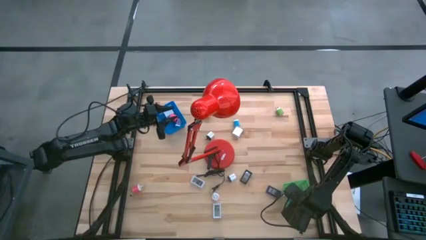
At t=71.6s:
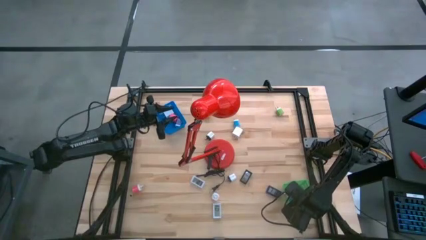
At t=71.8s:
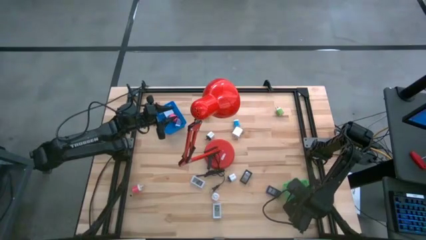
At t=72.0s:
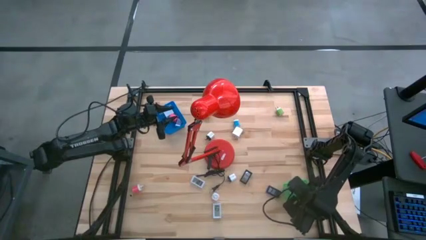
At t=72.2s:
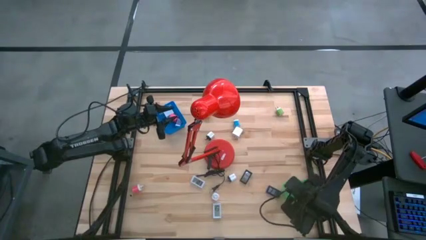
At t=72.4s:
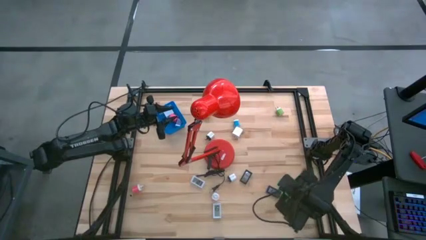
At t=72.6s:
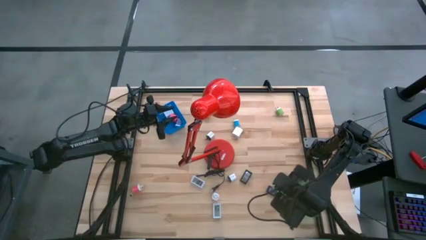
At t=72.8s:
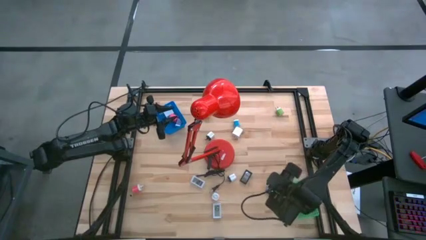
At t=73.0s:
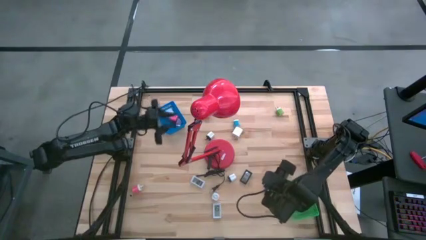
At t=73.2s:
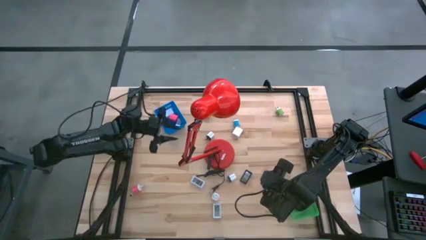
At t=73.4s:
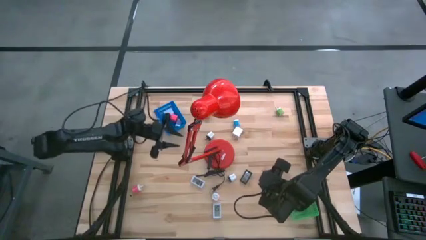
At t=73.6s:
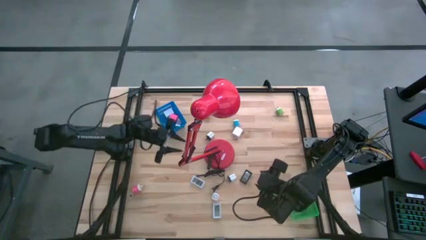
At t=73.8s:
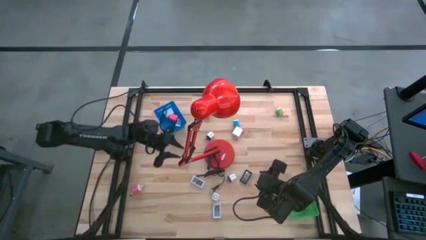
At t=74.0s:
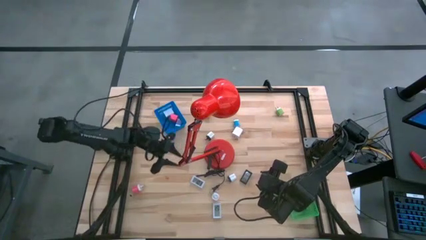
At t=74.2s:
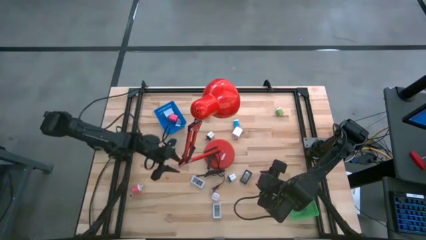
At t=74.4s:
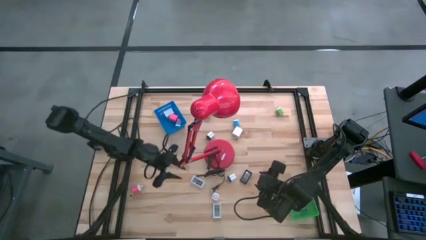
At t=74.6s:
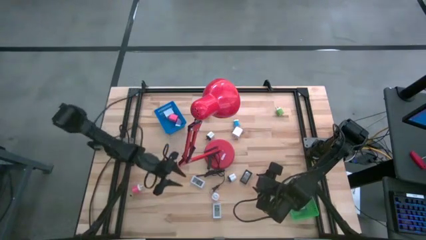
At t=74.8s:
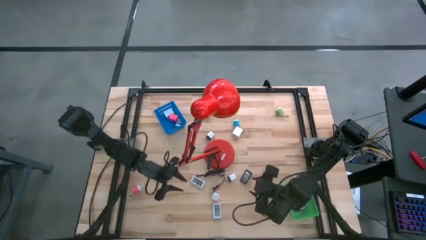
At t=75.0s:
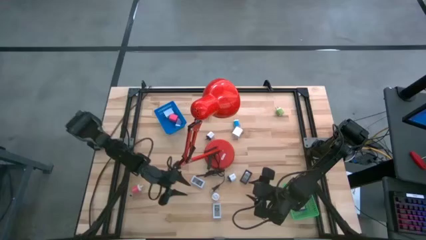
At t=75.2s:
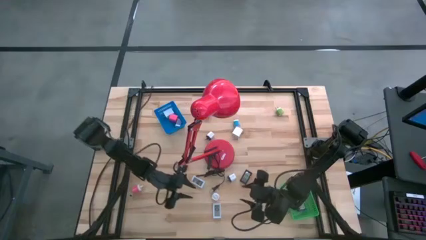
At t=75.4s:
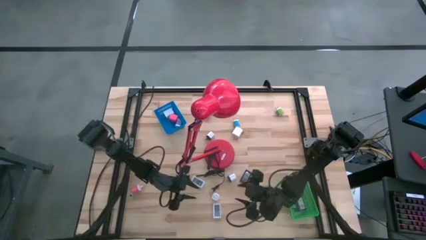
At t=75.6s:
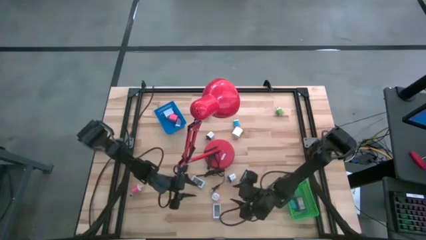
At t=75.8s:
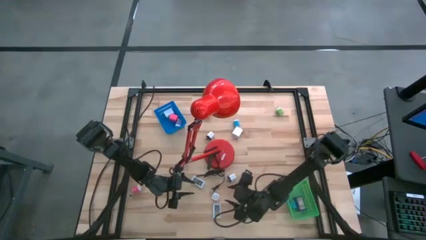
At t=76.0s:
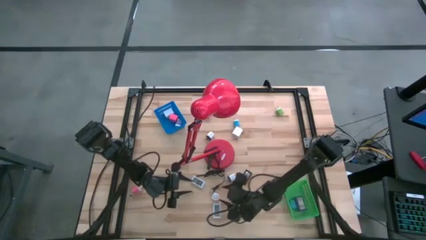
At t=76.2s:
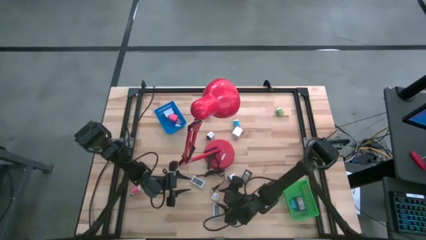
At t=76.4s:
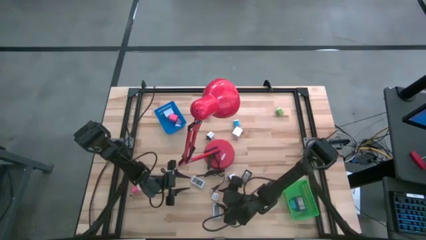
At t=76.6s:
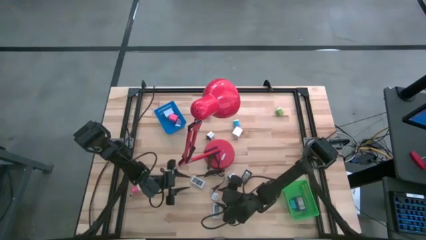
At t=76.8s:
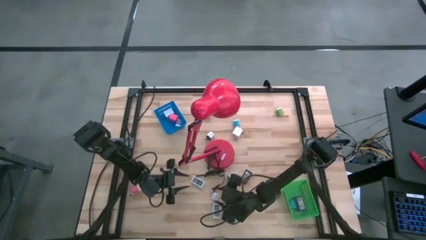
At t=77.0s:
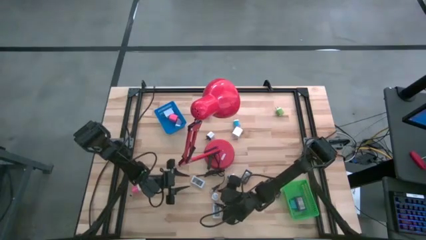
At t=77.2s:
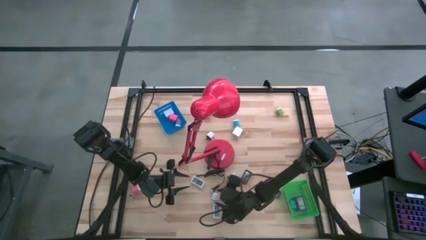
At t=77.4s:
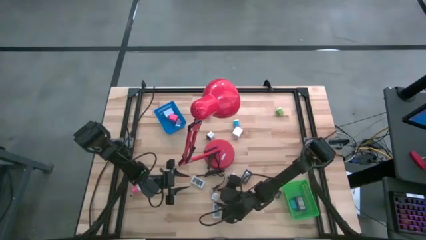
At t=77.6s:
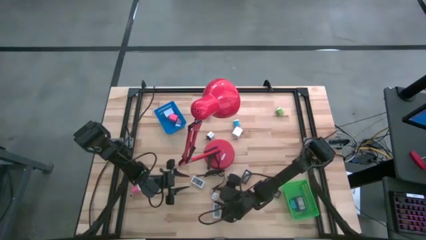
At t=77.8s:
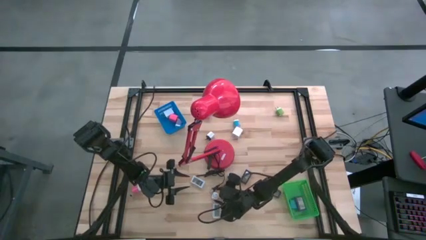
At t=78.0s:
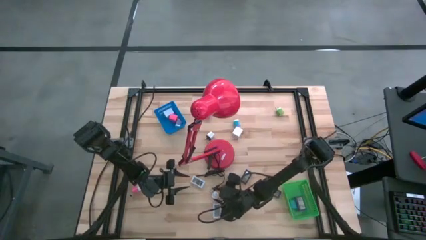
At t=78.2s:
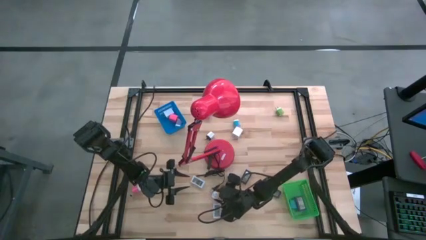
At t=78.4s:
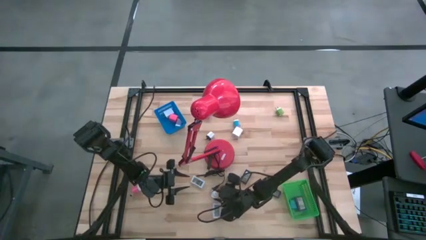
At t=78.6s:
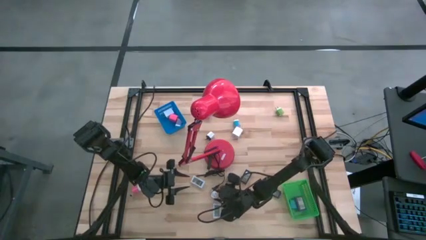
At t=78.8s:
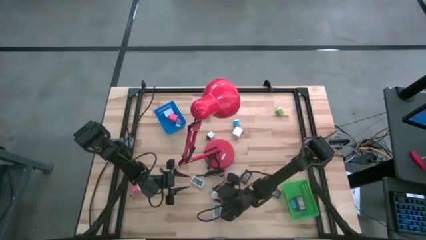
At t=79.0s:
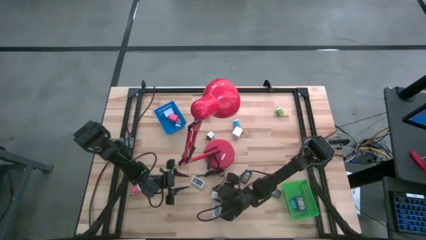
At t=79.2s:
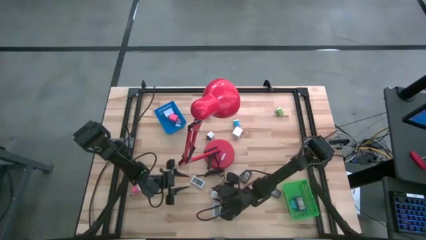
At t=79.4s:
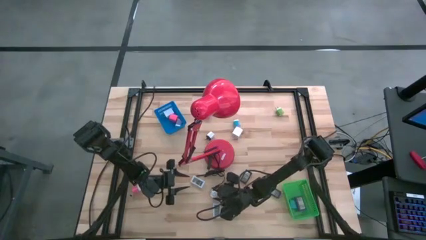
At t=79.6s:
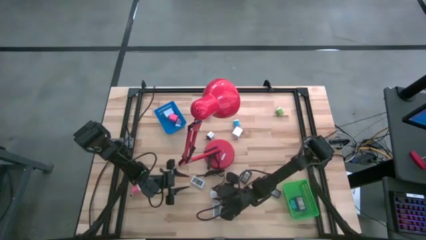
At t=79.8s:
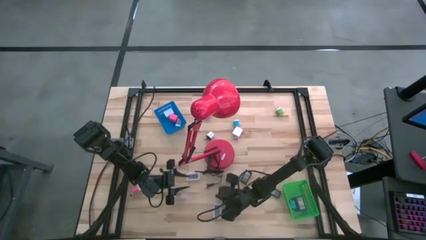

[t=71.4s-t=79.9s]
Task: Pick & Place Office items
Put the right light pink charger adapter into the blue bin

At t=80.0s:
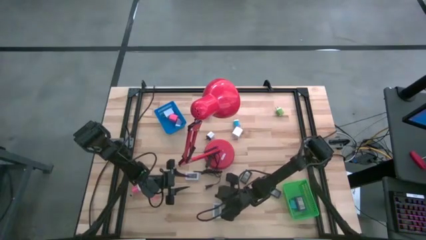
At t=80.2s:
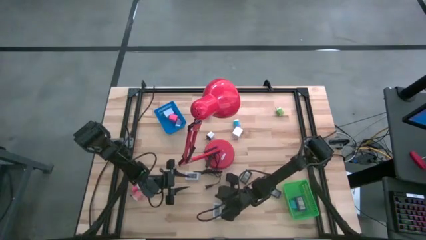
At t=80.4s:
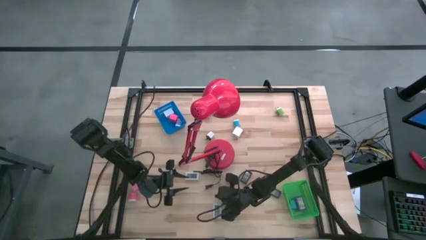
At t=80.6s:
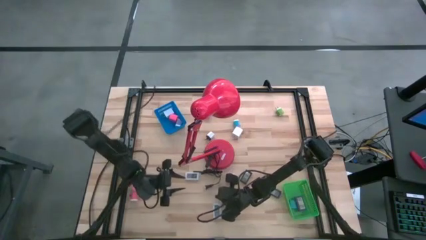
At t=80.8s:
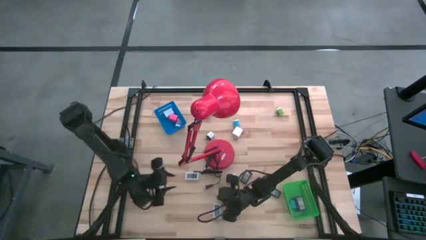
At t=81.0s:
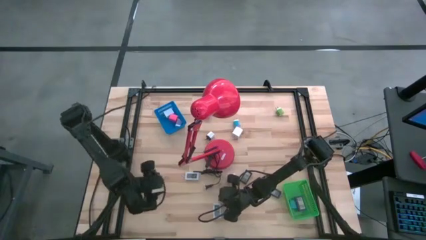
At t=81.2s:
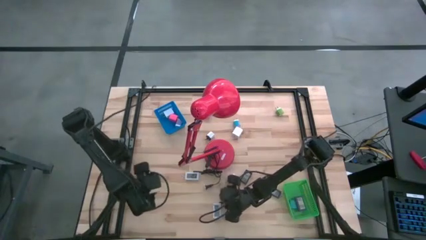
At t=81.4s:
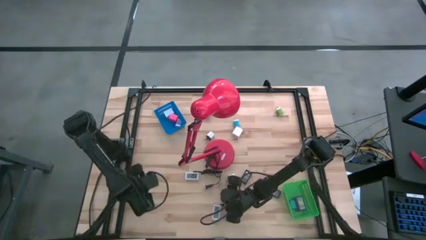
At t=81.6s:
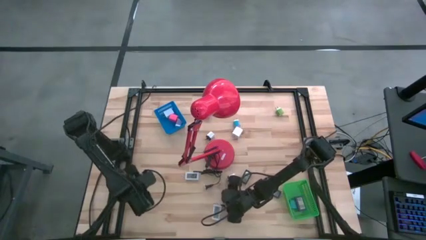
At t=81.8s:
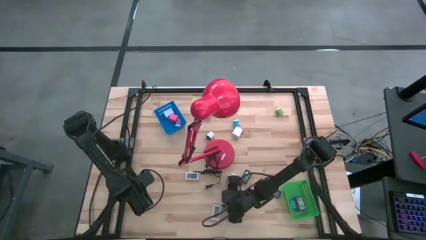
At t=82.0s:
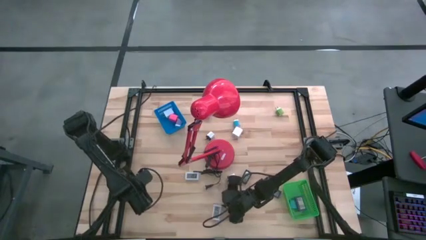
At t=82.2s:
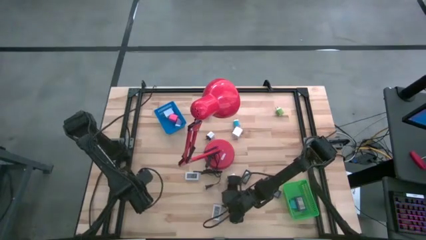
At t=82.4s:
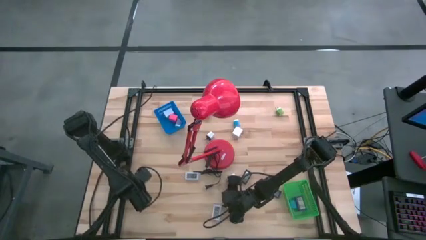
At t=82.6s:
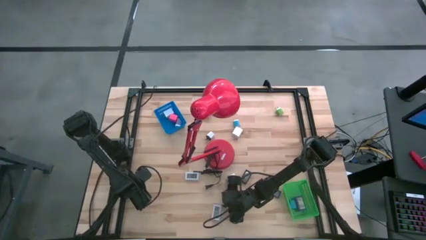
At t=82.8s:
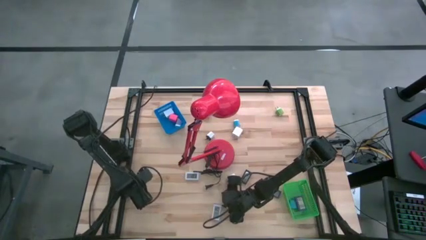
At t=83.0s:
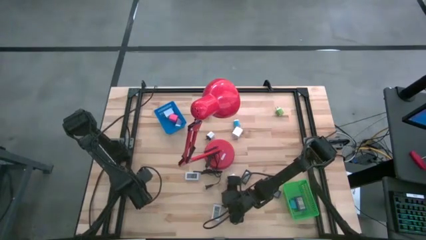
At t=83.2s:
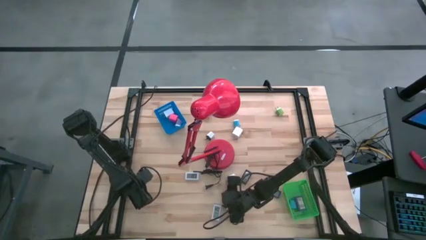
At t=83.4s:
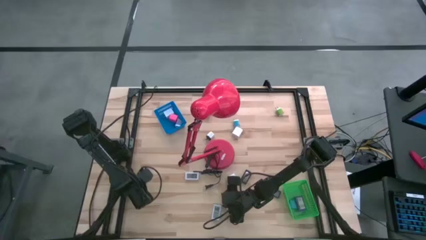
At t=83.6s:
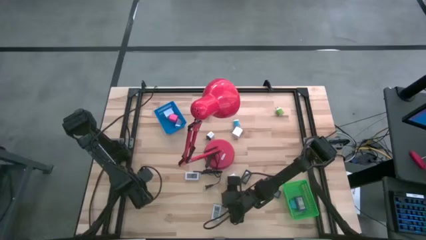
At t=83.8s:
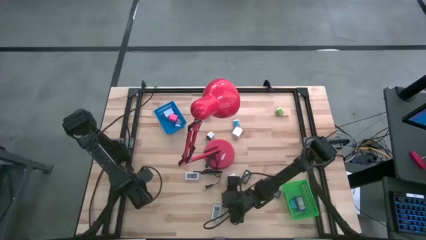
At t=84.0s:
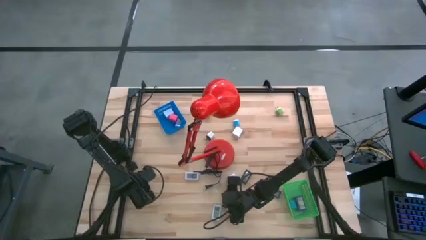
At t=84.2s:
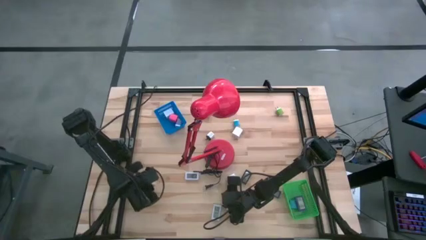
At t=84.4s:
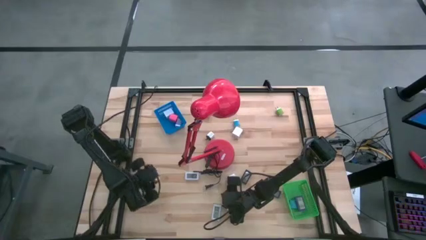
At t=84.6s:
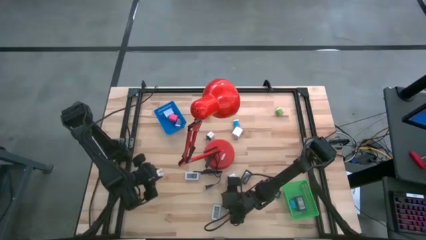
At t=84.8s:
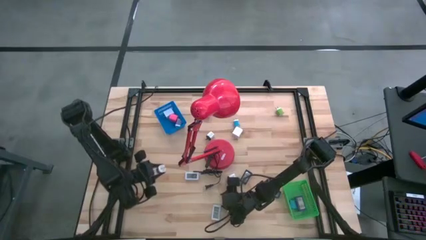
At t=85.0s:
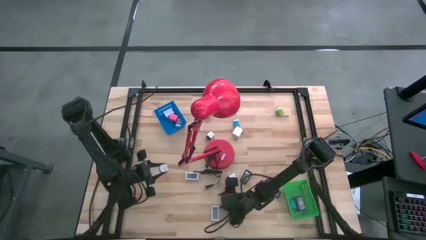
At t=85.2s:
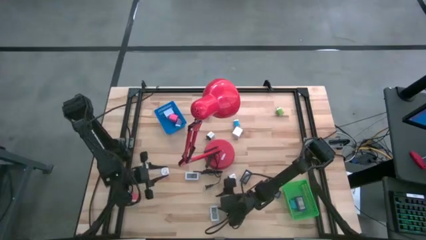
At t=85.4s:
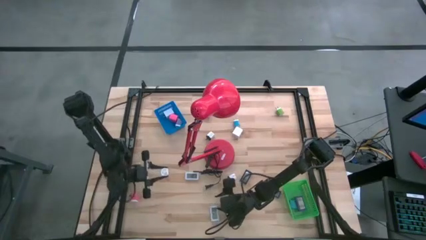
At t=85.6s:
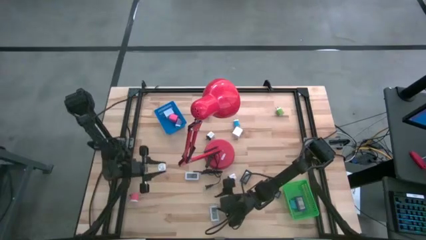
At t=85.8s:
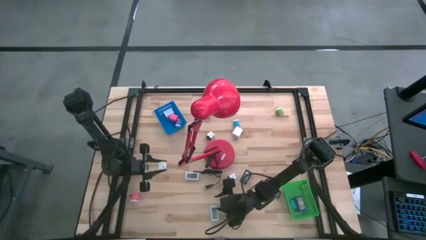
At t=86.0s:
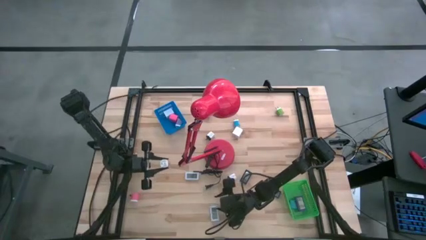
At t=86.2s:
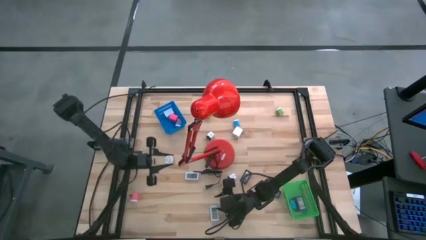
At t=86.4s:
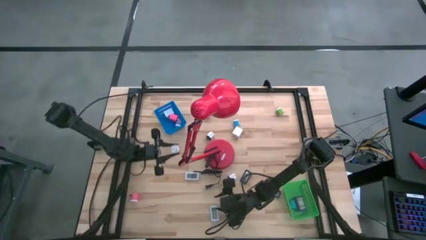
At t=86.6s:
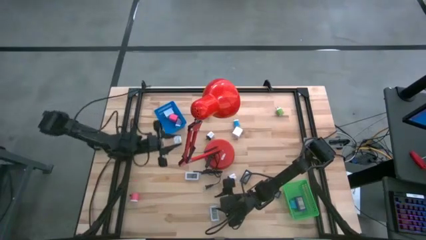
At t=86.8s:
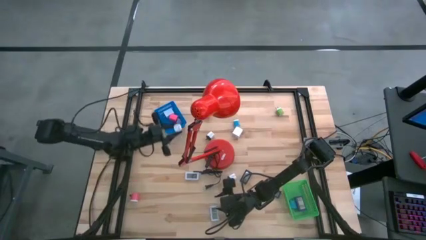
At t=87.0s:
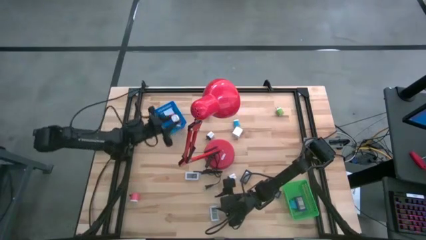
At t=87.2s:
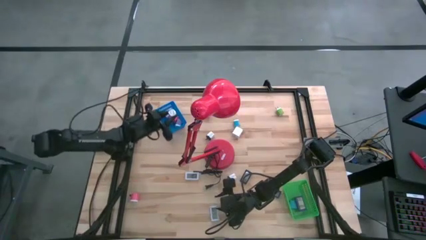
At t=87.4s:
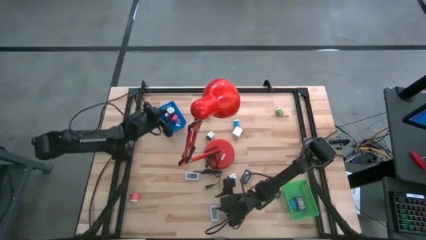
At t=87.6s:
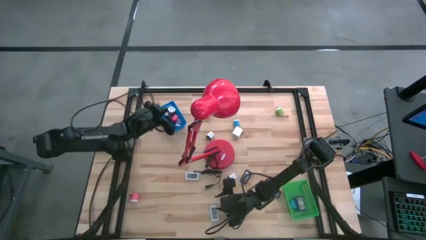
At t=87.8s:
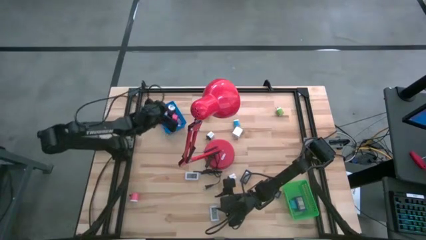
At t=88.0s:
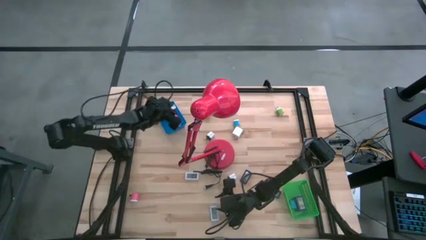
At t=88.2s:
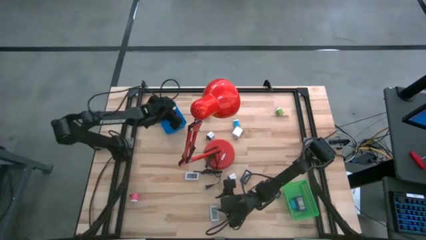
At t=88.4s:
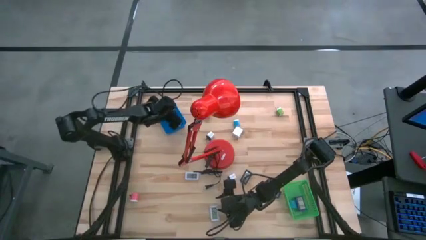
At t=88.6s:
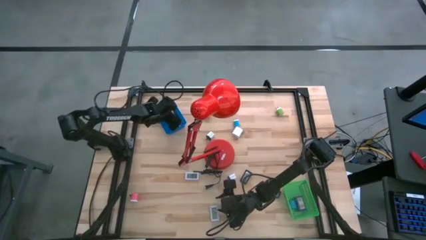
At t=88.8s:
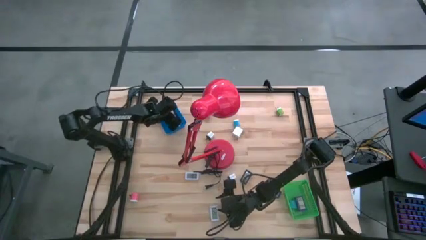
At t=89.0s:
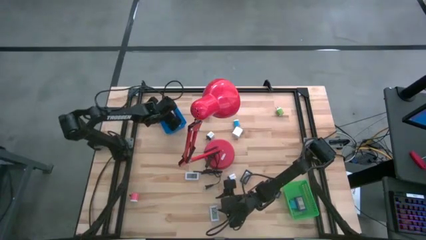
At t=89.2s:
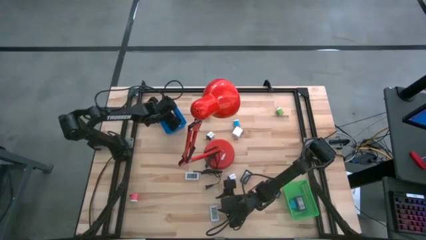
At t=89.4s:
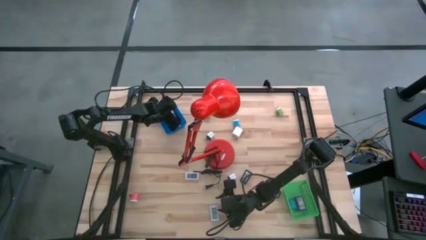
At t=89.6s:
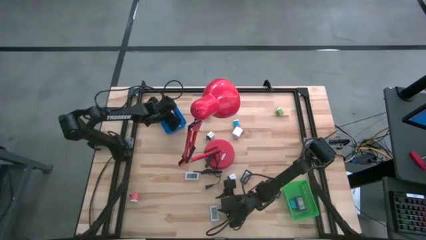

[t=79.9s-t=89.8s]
Put the top light pink charger adapter into the blue bin
